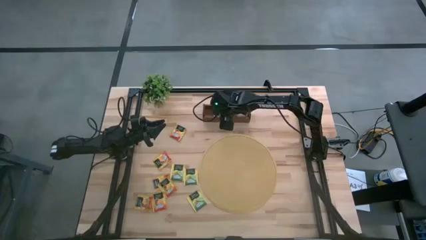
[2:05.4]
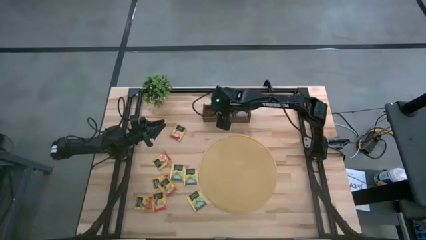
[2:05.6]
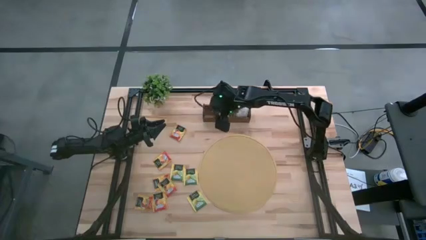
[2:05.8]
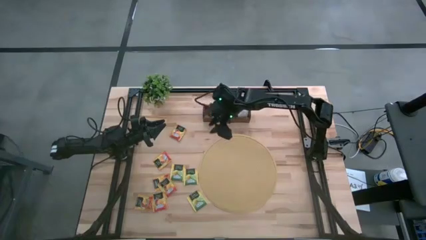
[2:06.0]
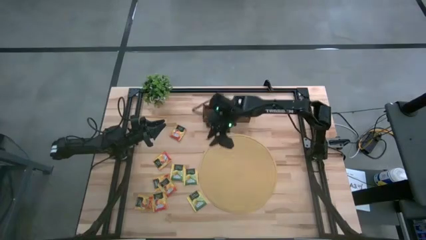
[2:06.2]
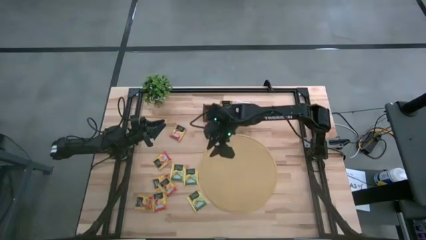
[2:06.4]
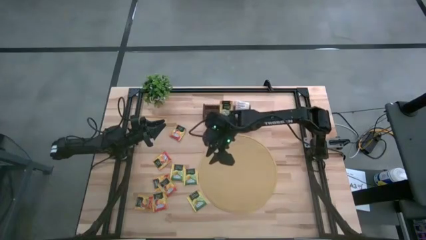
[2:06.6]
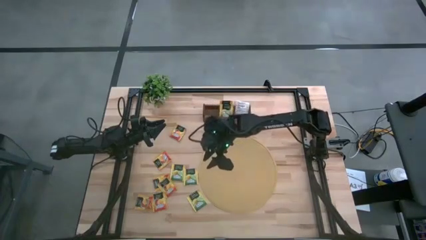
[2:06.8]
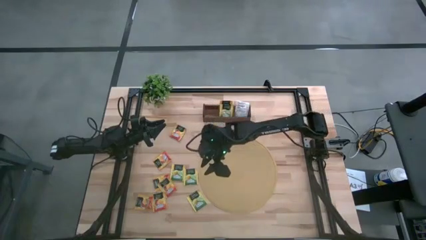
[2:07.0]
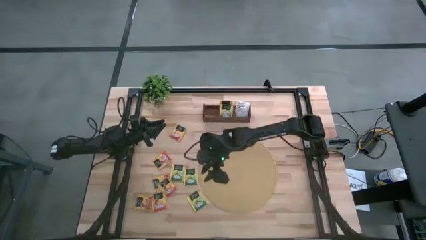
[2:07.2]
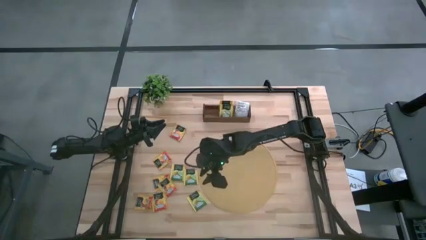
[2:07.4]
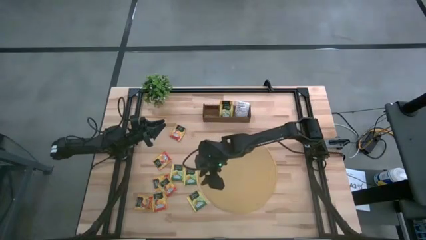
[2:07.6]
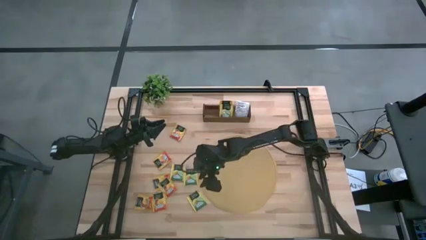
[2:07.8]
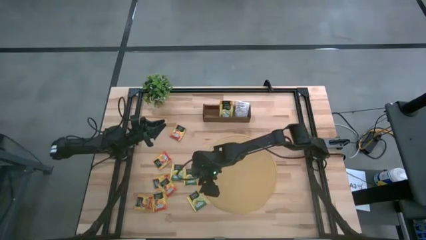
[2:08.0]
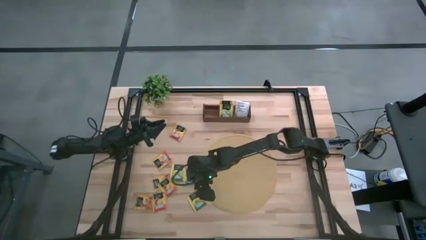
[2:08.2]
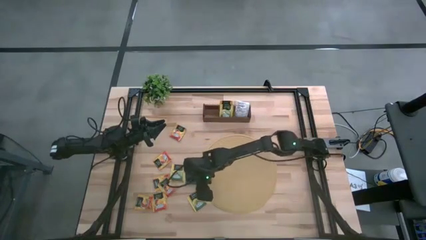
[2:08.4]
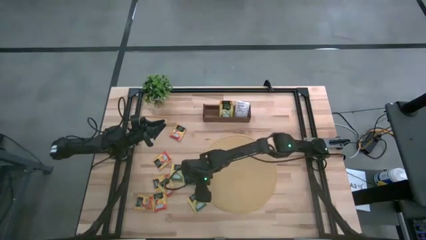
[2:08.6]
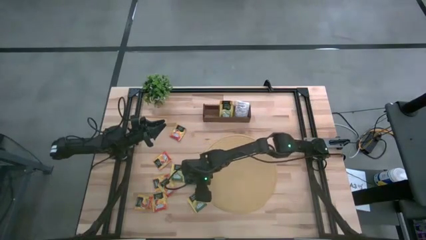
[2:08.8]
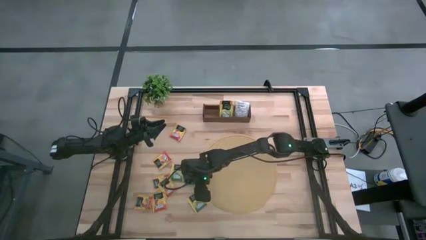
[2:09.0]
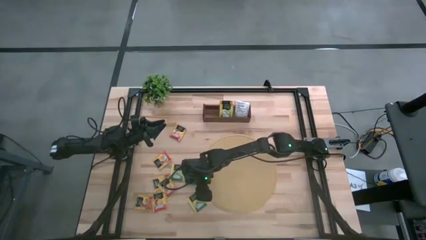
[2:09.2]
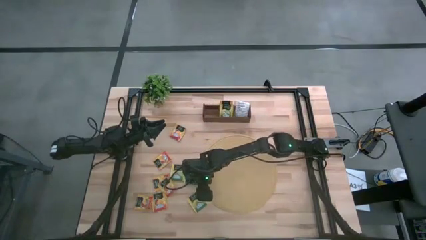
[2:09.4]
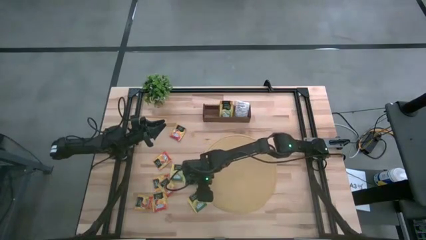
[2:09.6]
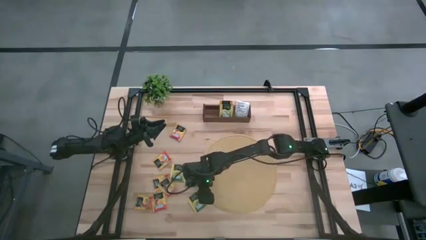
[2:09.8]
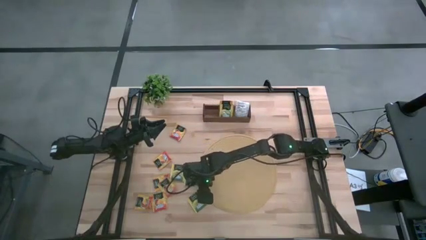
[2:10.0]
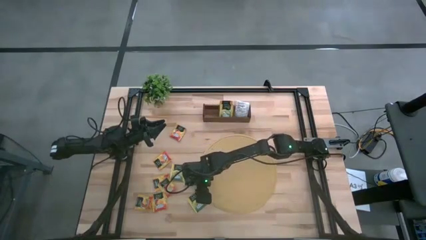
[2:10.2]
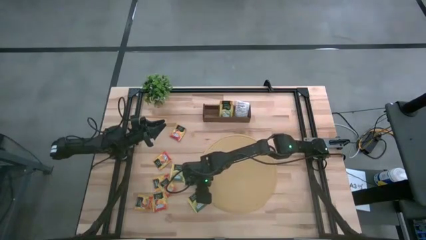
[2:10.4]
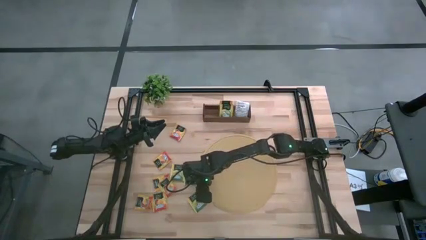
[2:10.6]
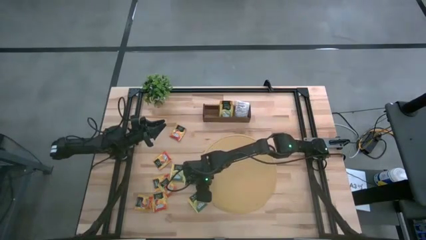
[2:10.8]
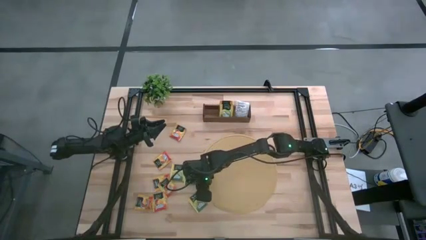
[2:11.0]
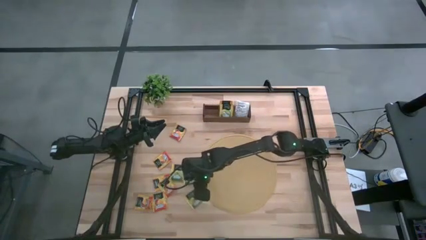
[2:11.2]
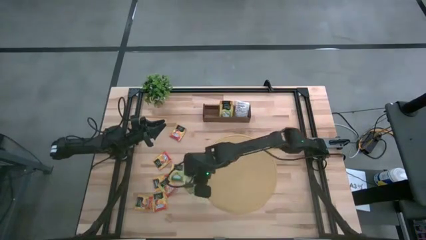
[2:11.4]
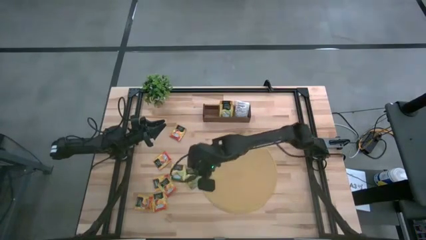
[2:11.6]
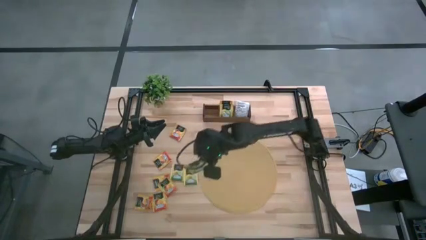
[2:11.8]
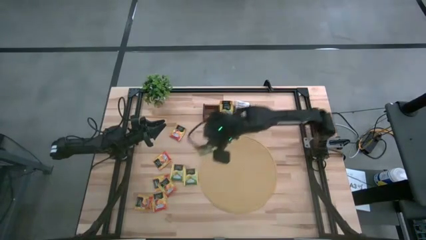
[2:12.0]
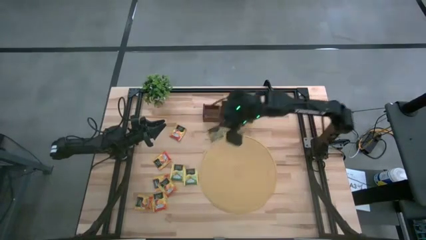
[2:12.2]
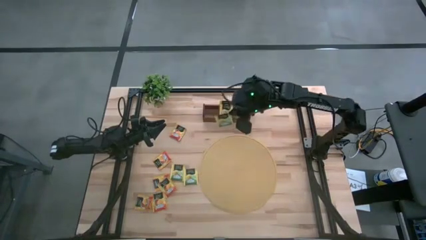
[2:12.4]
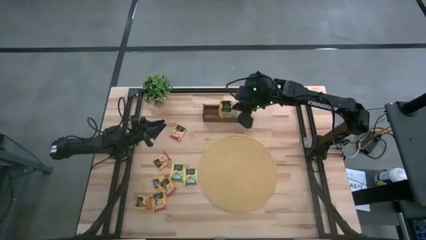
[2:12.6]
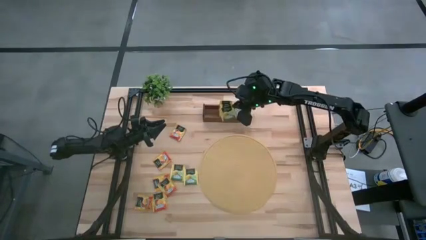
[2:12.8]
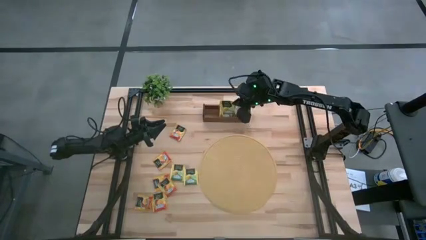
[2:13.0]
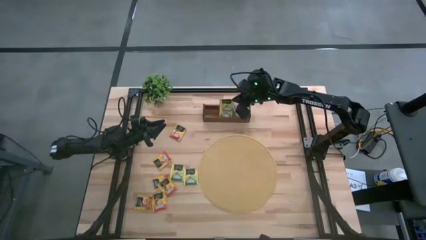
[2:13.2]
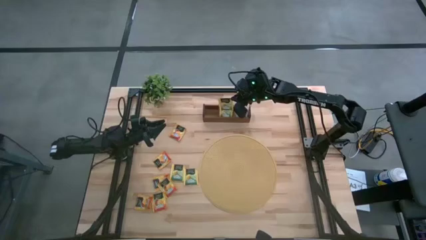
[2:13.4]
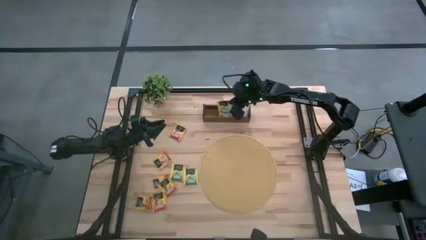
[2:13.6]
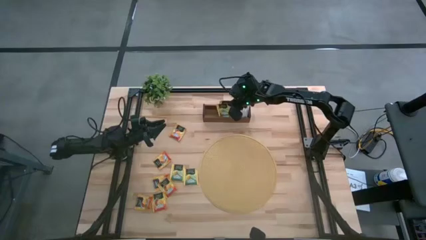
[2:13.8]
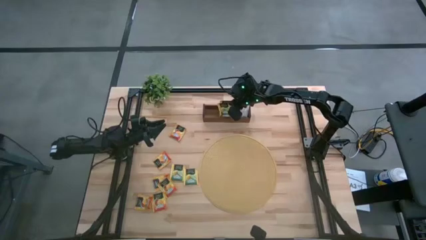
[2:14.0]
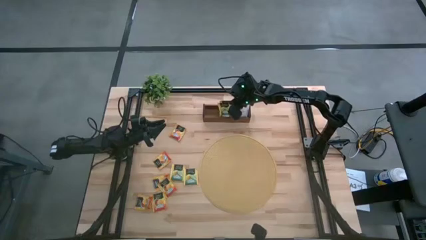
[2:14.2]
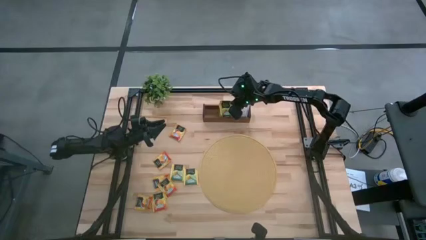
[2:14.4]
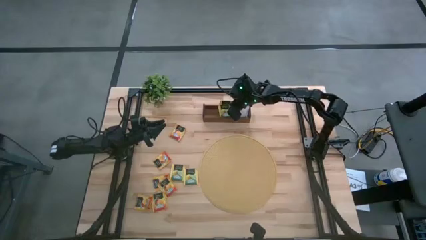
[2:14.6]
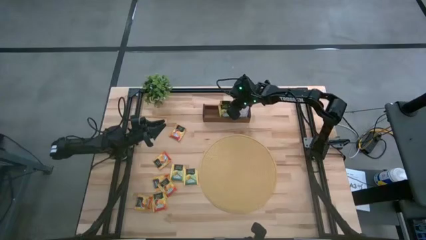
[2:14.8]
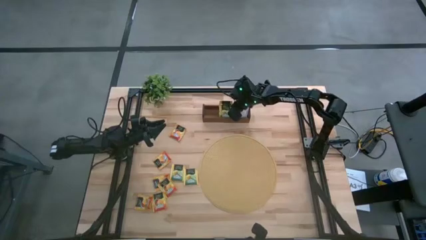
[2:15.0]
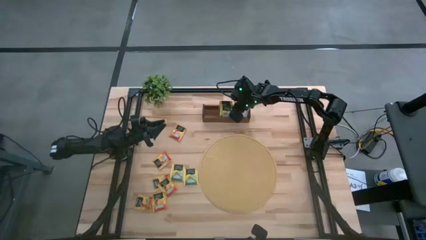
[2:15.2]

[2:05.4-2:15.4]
Task: Pick & Place Tea
Put the yellow tea bag into the middle section of the wooden organizer

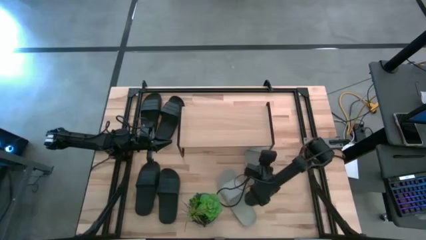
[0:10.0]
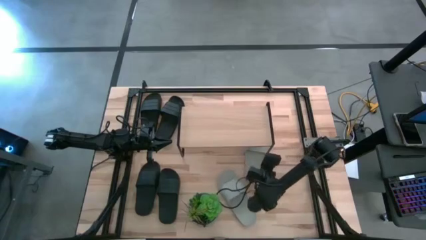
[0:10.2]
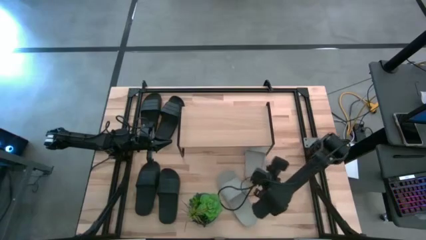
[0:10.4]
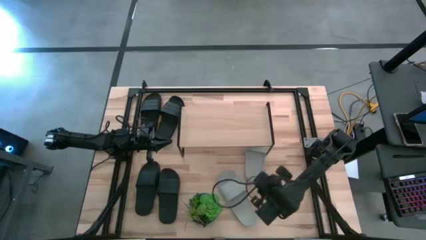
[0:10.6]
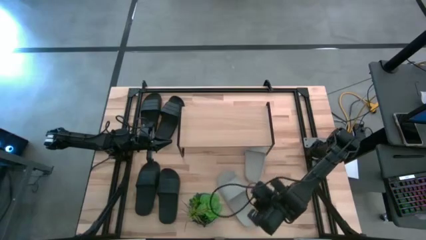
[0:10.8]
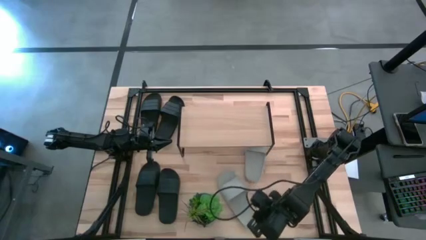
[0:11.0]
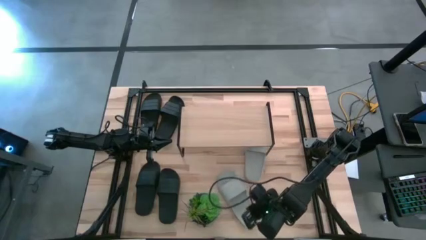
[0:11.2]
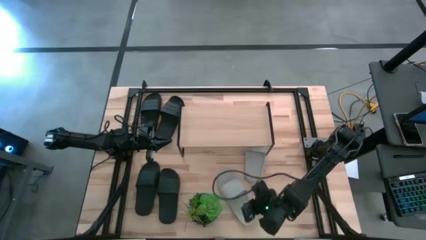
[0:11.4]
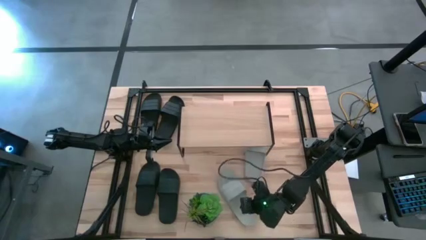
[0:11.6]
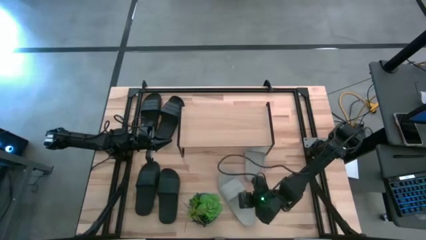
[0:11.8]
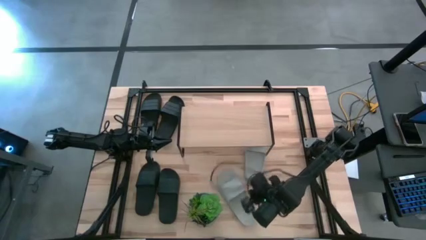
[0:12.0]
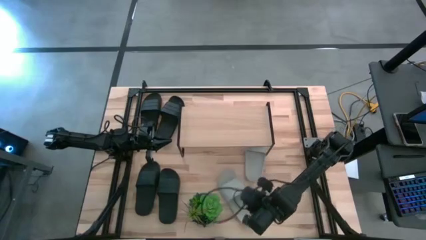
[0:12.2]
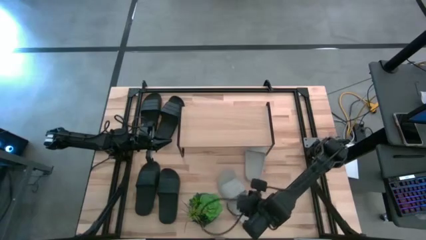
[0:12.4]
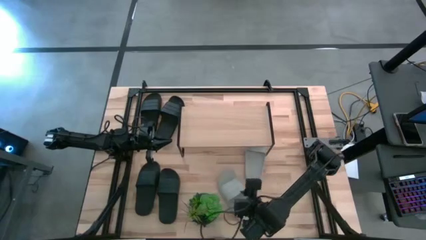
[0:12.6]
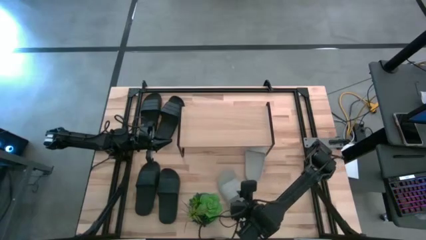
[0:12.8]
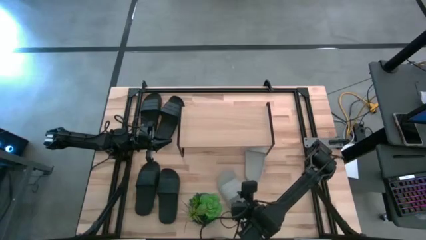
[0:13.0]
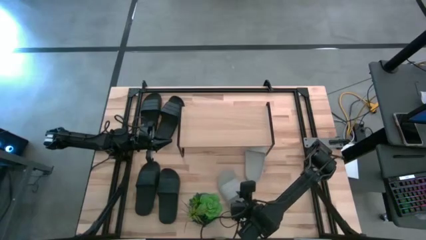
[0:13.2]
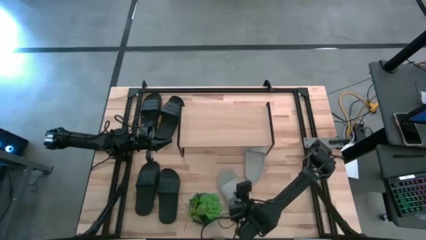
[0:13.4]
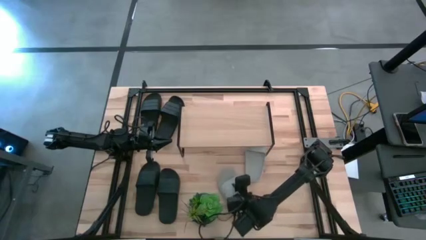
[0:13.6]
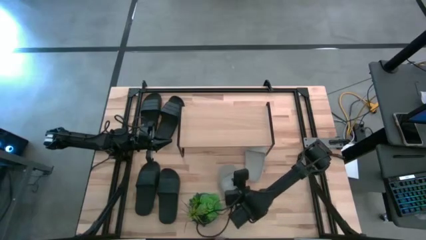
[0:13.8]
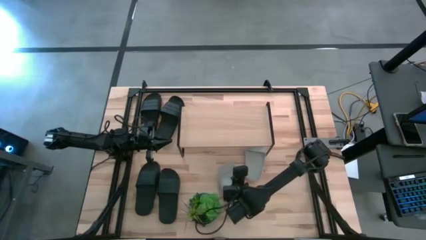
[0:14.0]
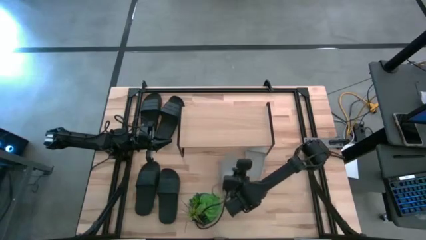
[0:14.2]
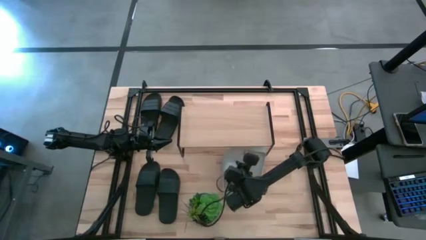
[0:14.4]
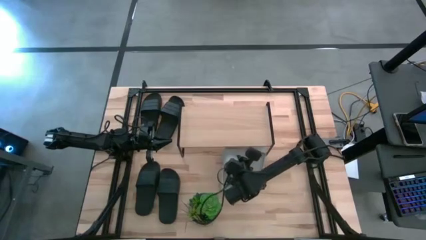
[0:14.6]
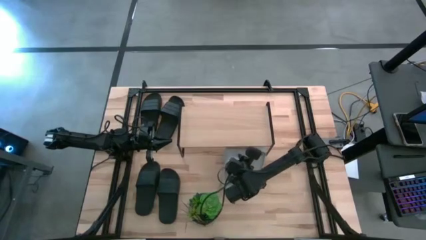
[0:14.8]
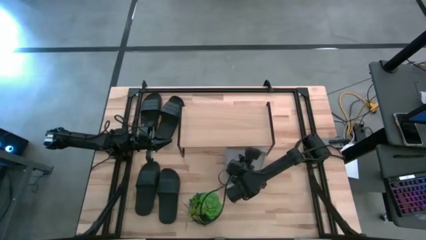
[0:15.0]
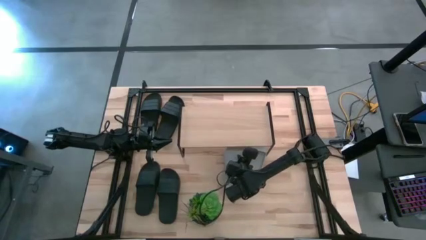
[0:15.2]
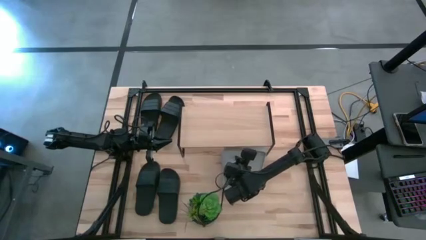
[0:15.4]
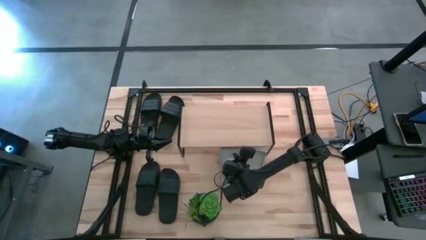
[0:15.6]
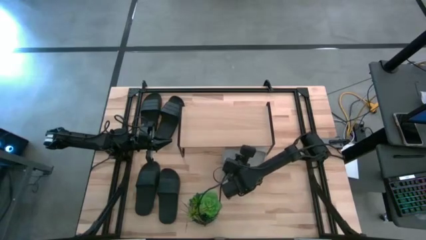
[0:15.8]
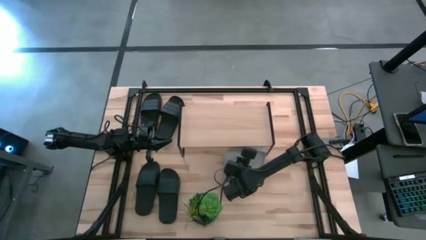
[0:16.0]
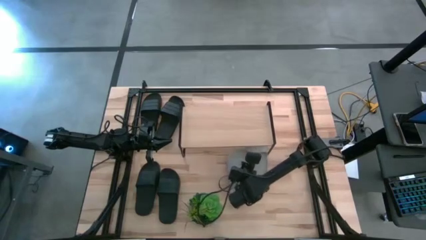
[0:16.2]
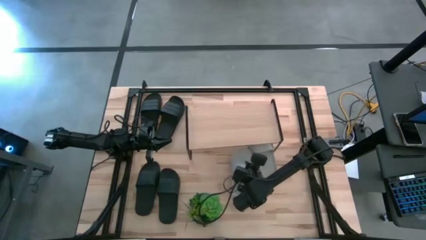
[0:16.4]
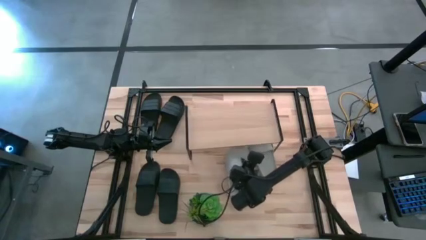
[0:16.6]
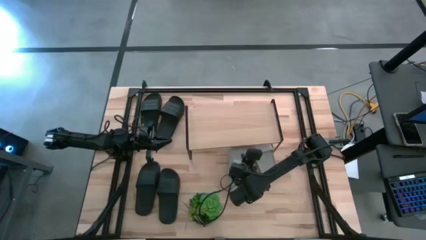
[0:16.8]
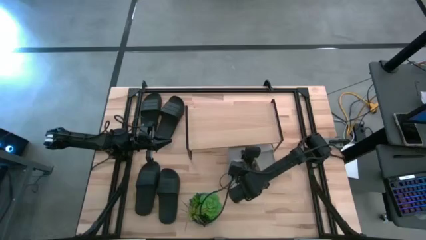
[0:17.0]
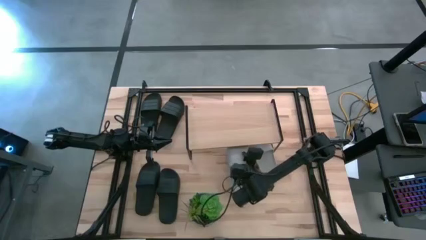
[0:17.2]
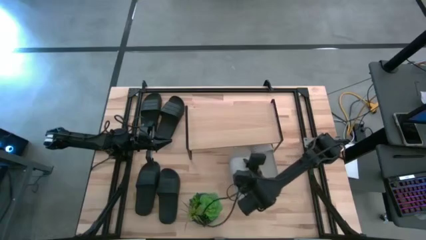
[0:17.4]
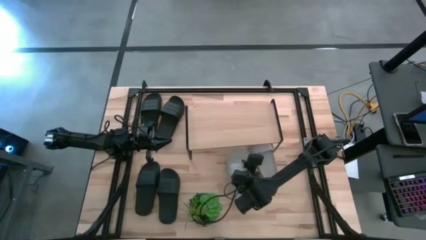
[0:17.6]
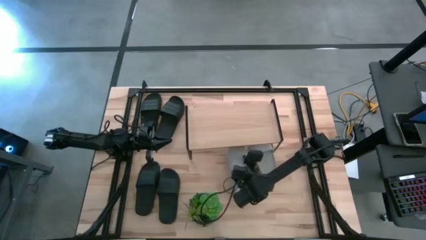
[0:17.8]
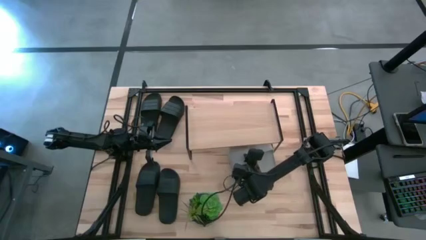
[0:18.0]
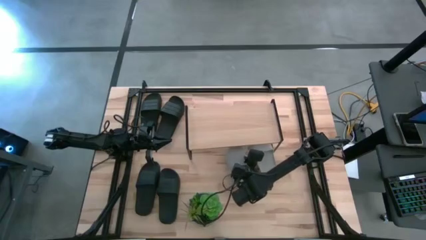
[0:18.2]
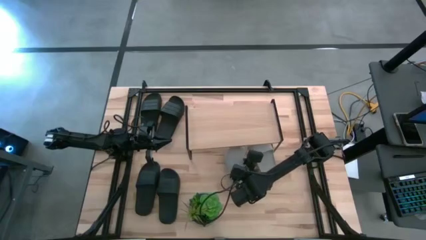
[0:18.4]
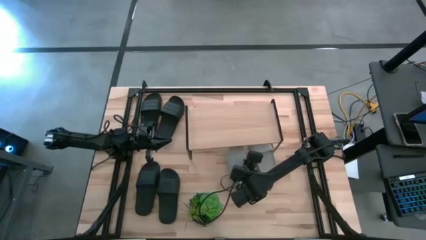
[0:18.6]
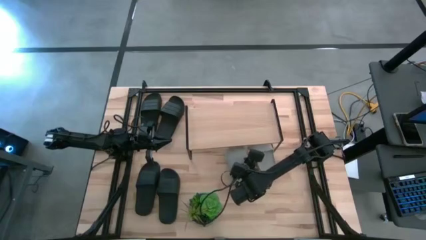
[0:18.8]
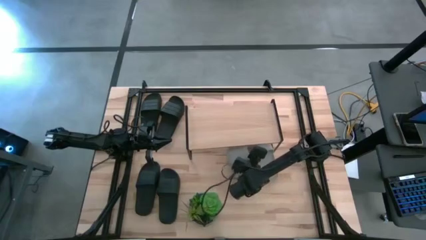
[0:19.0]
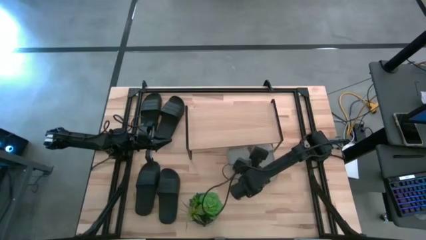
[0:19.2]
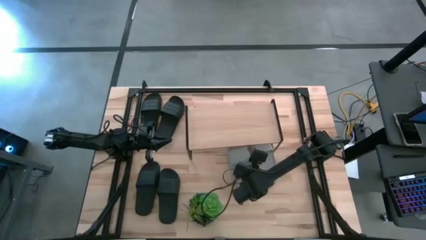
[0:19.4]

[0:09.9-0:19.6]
Task: Pick and place slides into the shelf
Put the gray slide under the shelf
